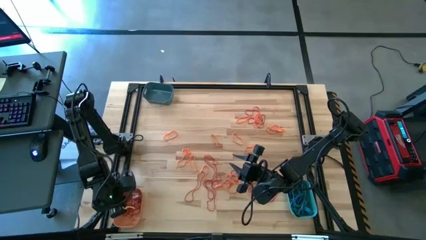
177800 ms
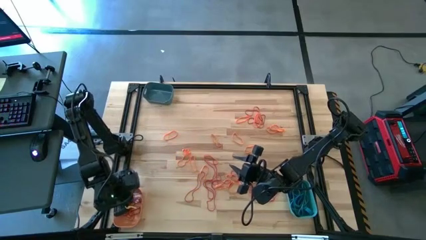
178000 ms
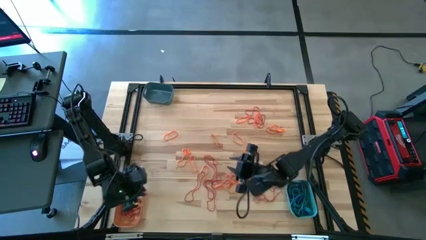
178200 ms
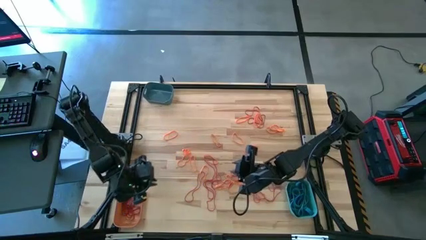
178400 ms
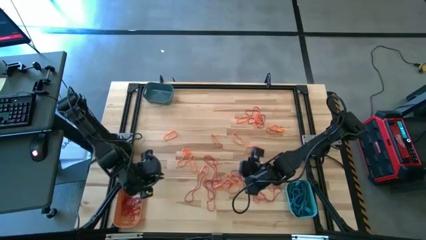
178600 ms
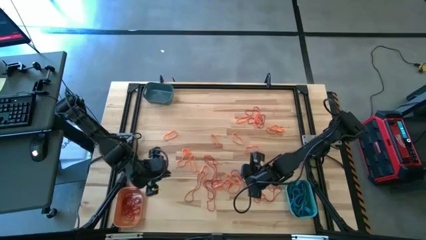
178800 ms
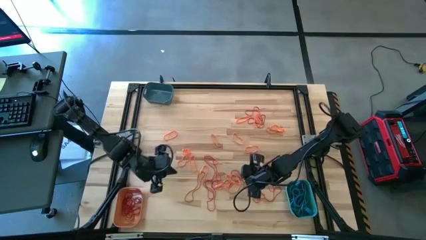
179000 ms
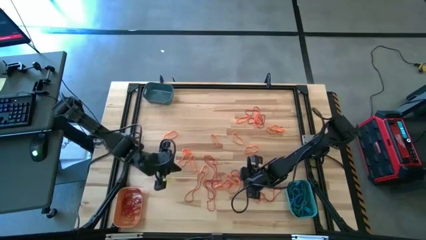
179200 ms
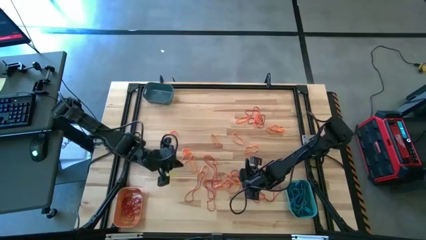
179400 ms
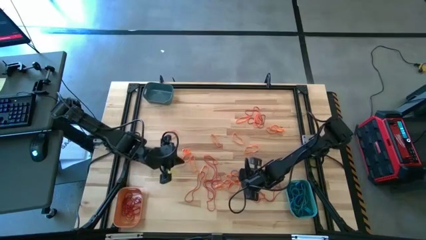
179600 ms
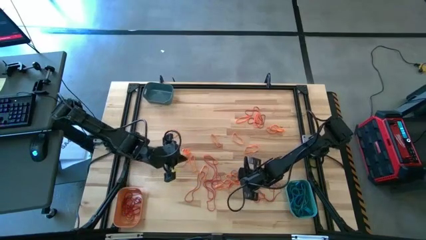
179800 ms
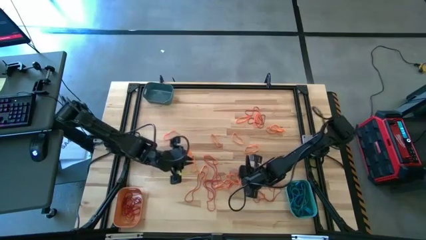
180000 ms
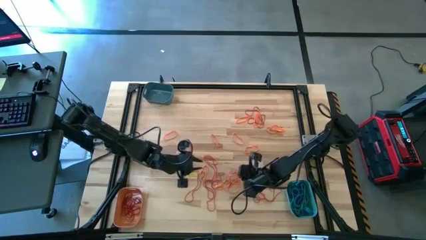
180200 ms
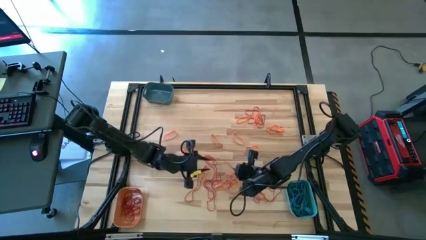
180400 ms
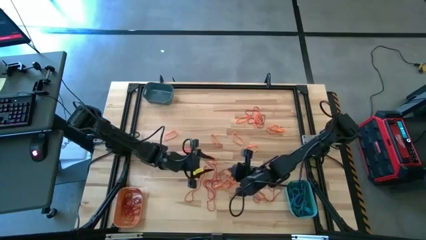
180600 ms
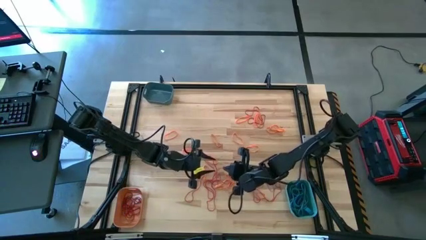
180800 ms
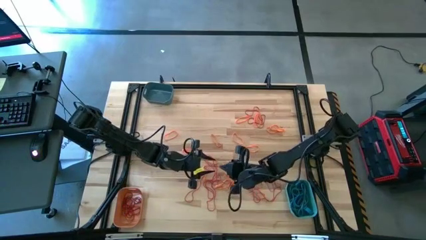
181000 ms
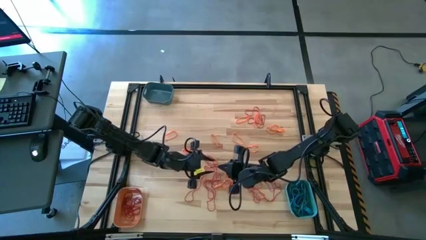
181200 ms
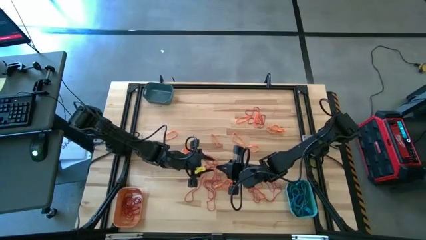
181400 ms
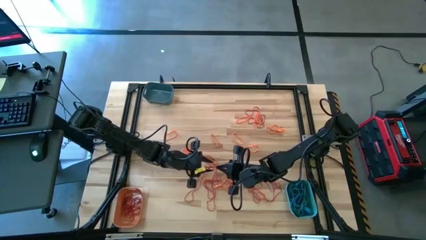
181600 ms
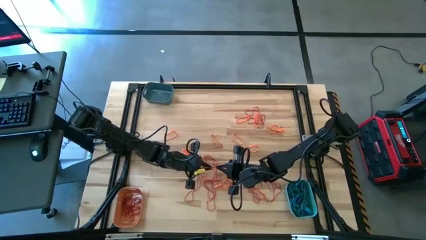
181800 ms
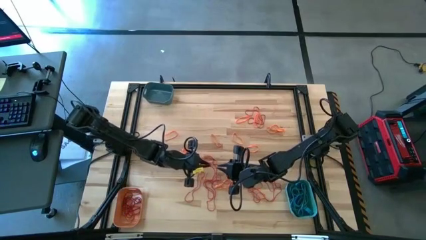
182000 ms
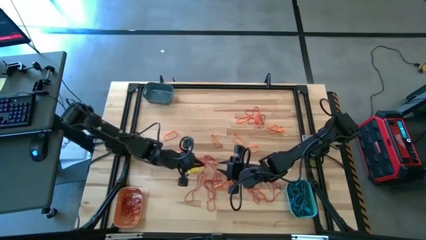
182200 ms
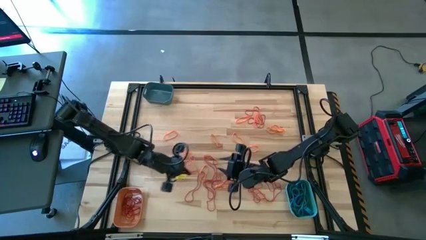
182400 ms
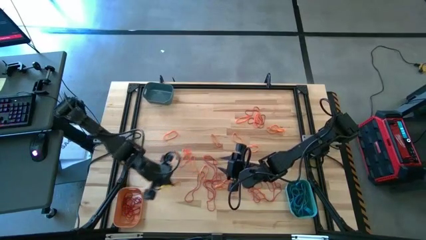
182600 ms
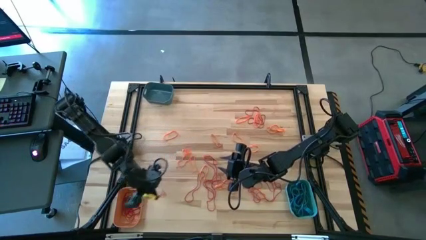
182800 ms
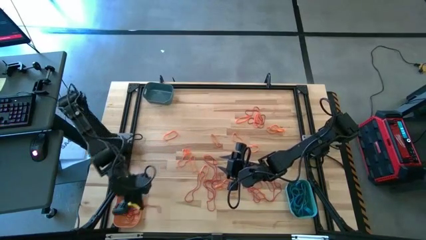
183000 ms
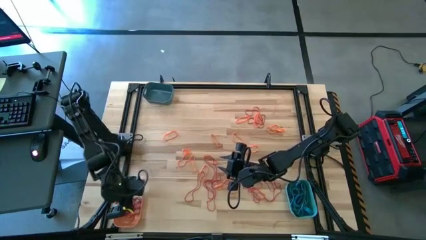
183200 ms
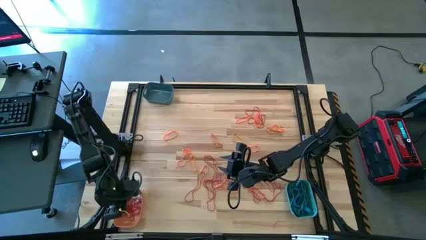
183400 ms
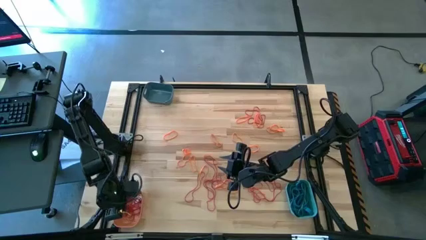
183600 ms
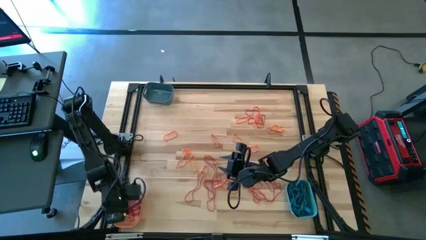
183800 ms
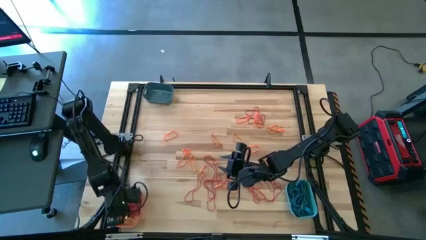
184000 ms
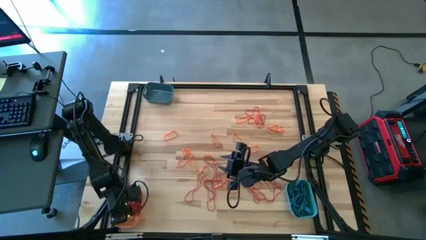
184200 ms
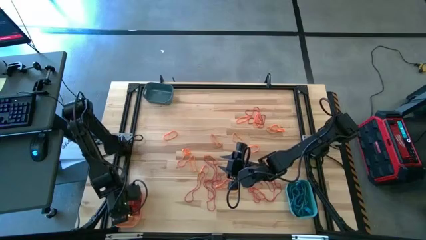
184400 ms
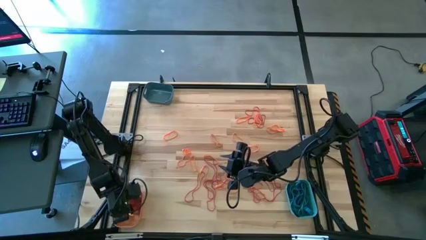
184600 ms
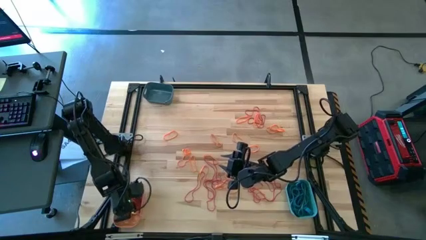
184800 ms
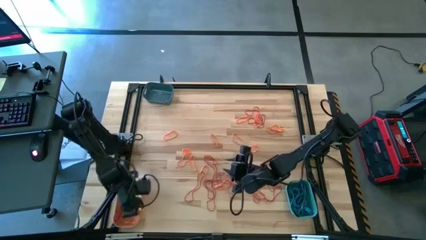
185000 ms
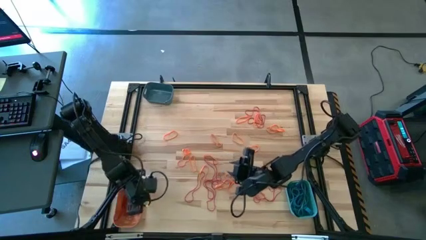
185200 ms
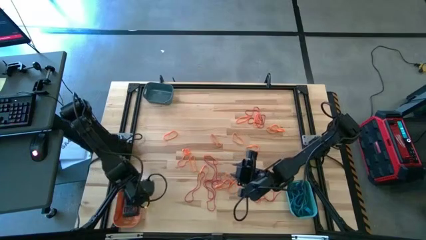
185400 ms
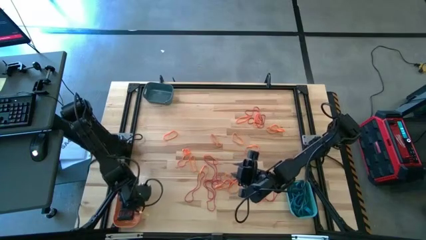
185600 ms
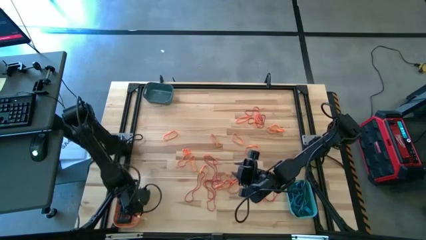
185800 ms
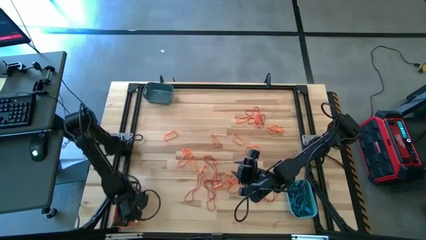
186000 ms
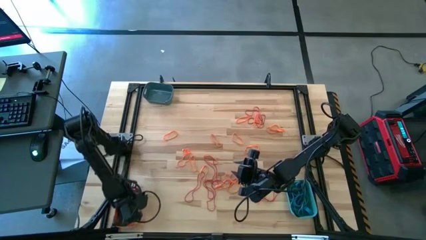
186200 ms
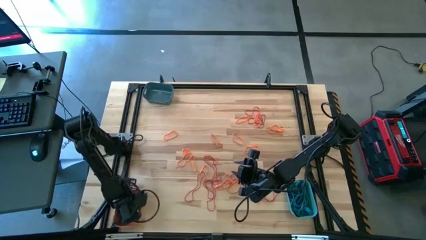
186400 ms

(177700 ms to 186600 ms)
Task: Sort rubber bands into baskets
Put the red rubber band into the orange bin

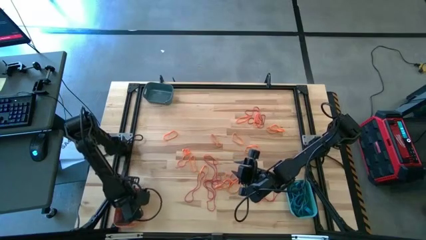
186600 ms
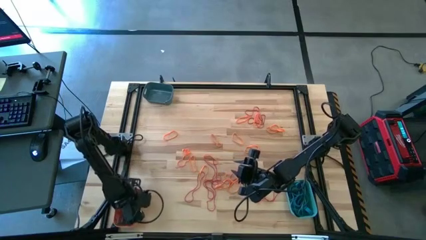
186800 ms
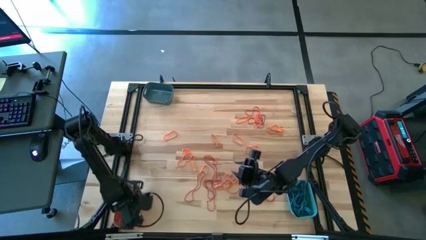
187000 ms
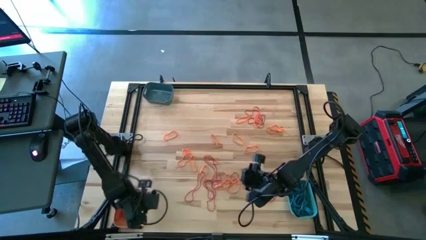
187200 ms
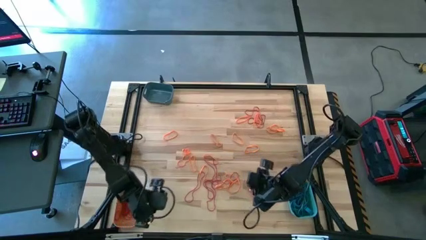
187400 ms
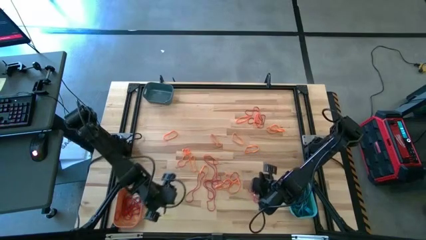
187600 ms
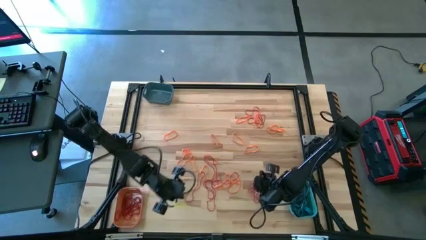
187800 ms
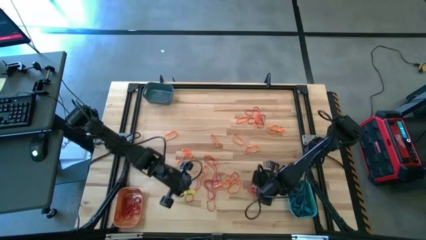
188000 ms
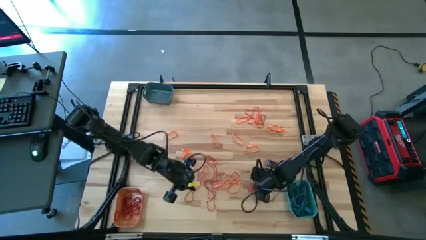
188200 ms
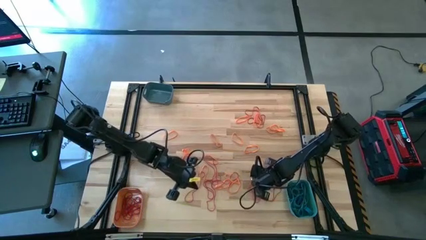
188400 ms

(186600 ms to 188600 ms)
Put the red rubber band into the orange bin

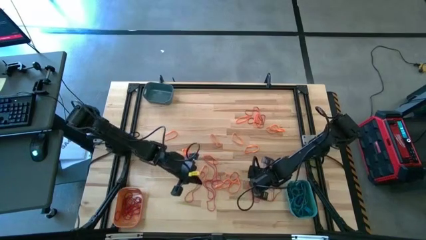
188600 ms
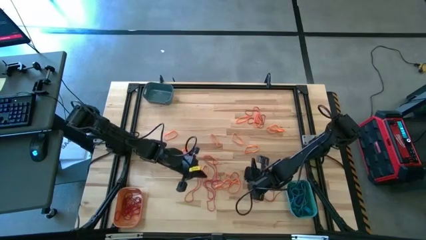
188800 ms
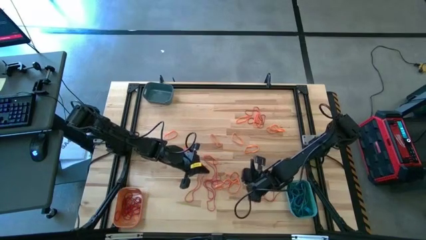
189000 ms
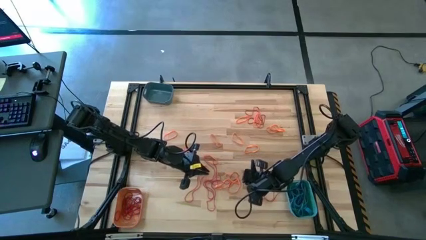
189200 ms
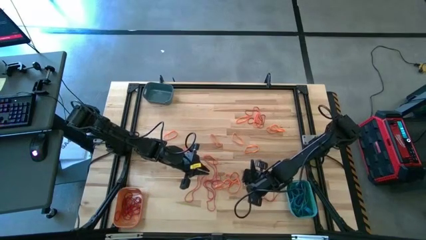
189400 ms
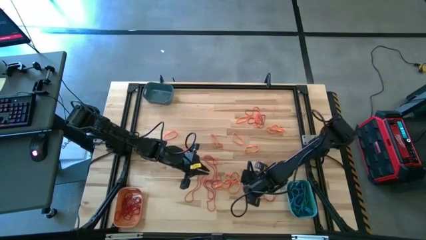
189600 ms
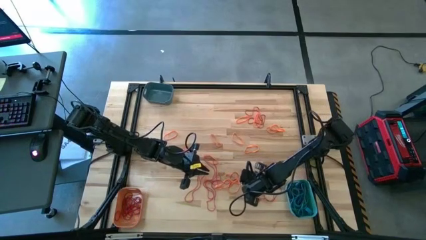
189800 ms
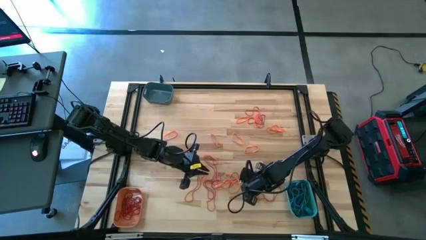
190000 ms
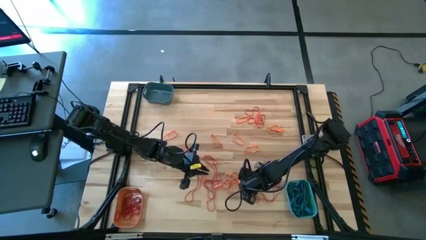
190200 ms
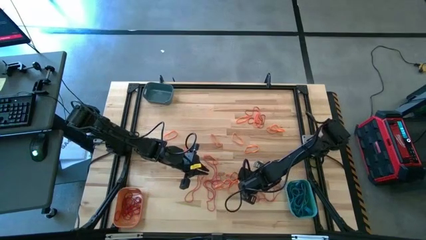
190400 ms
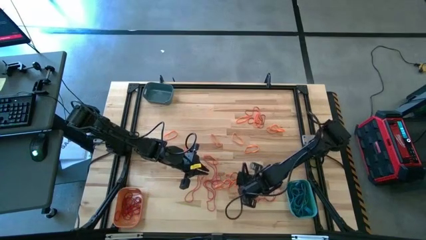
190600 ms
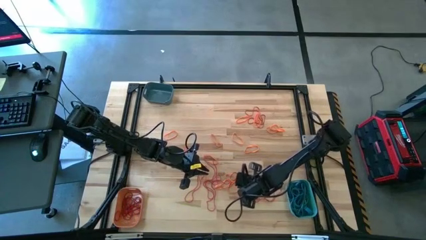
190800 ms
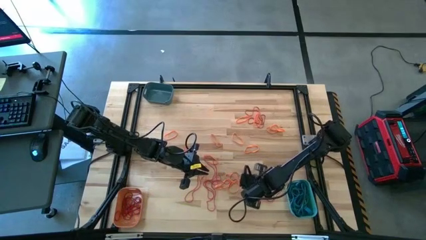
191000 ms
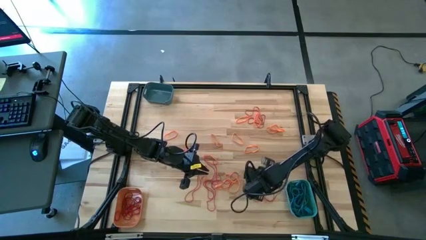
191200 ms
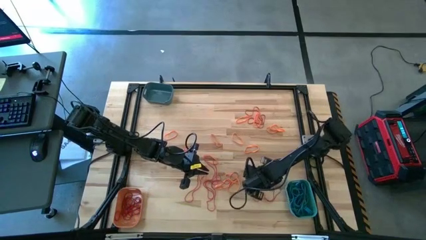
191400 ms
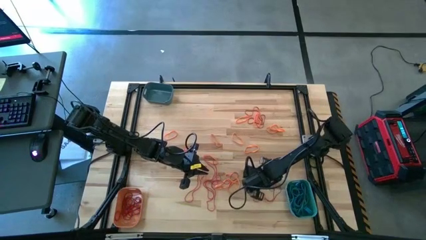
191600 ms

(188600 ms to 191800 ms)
Put the red rubber band into the orange bin

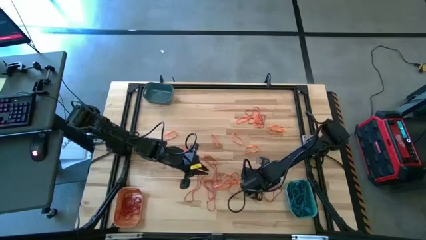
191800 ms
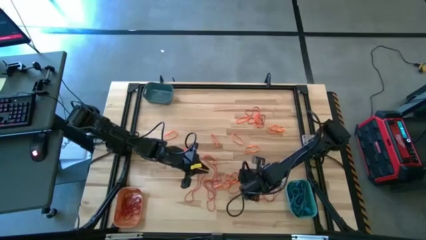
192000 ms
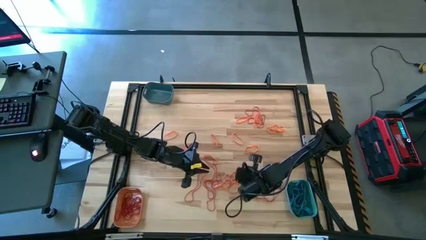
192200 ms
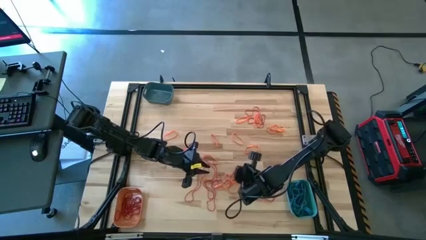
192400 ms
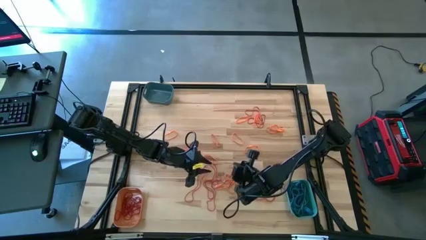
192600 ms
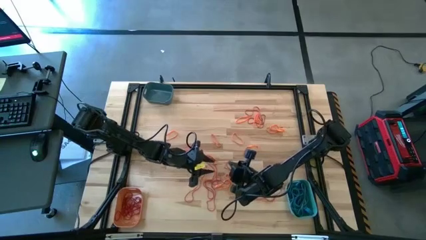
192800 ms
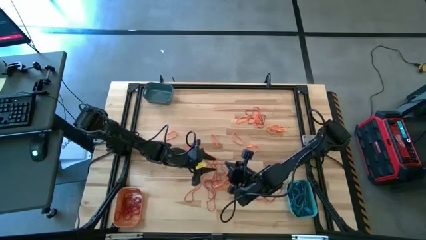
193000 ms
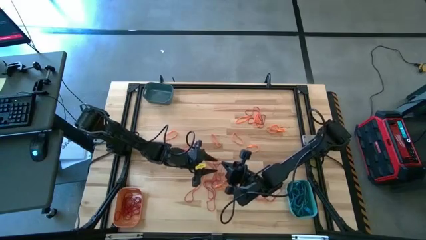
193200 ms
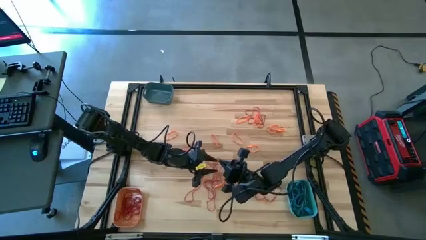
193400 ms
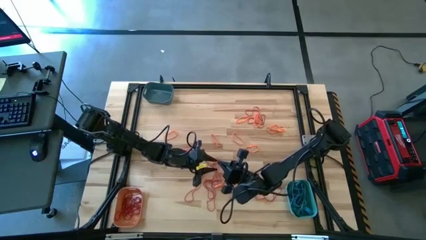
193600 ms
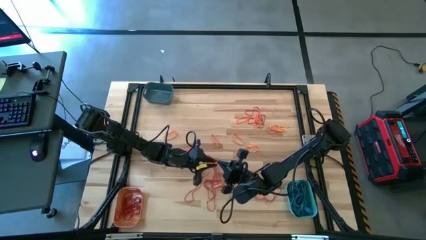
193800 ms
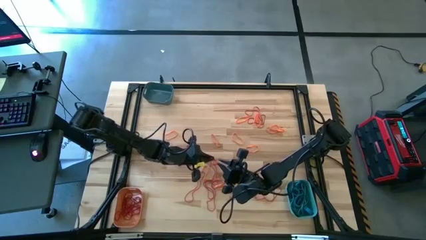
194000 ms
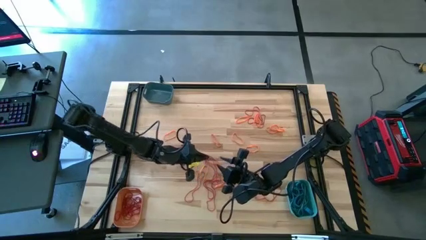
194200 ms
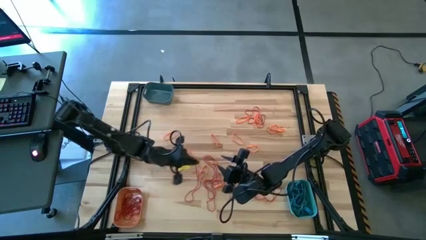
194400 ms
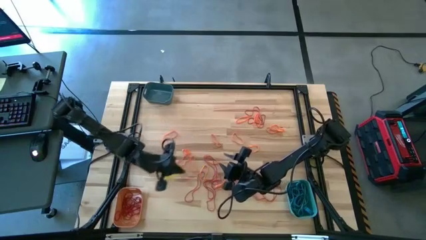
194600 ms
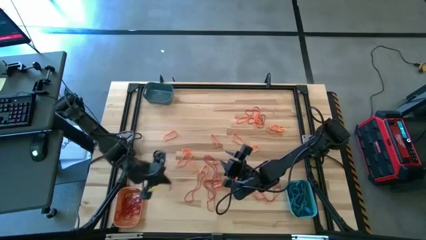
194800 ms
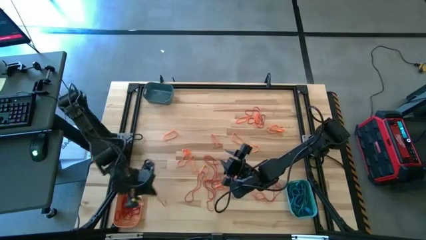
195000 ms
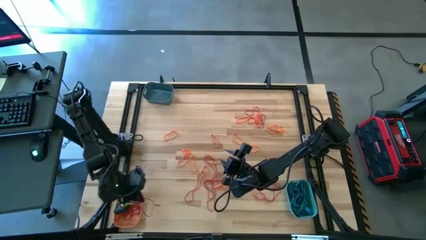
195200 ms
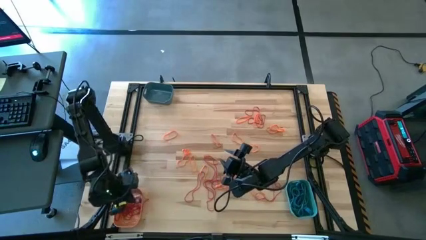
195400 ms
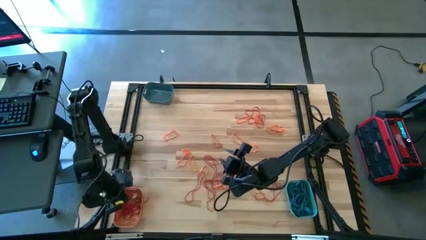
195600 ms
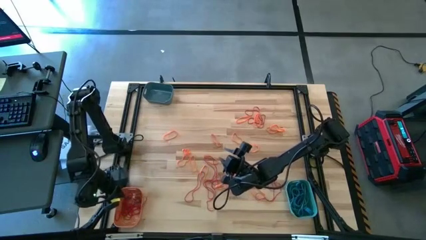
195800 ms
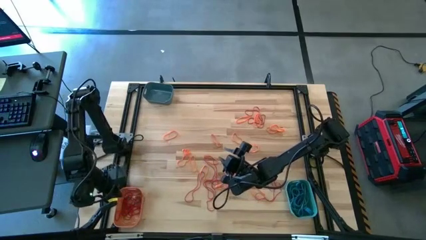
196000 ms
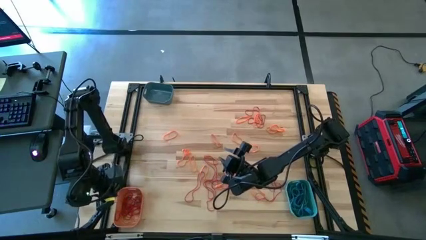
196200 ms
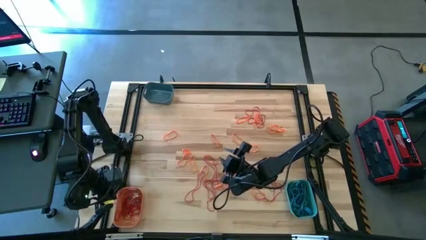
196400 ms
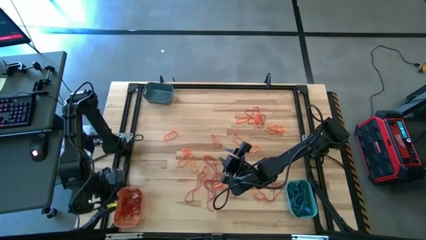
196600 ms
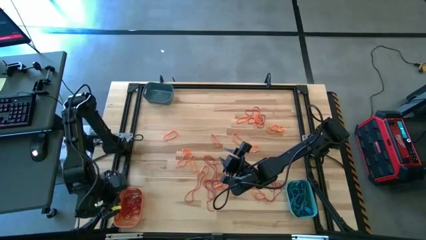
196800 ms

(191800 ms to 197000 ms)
Put the red rubber band into the orange bin
